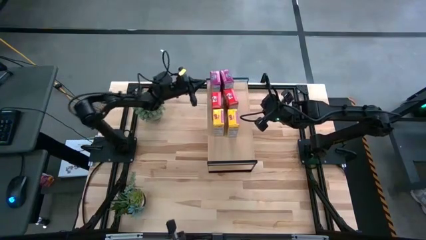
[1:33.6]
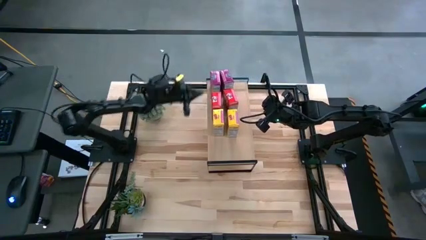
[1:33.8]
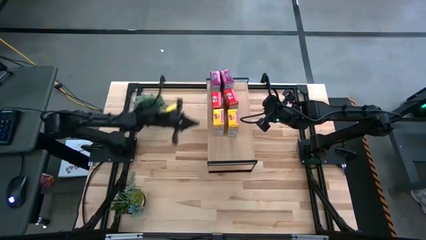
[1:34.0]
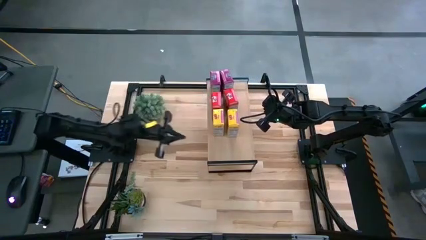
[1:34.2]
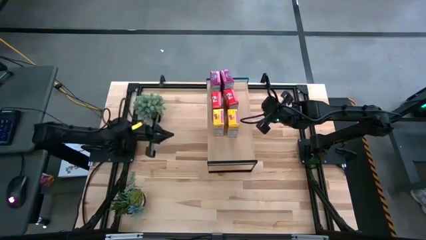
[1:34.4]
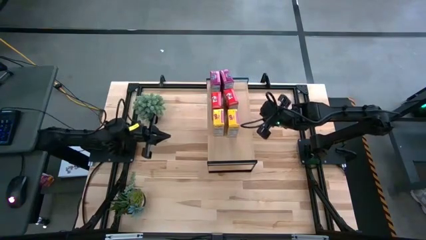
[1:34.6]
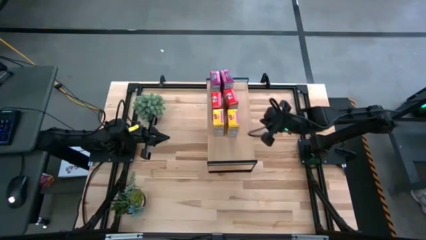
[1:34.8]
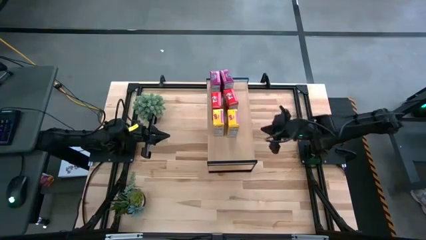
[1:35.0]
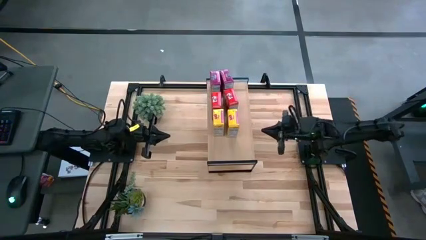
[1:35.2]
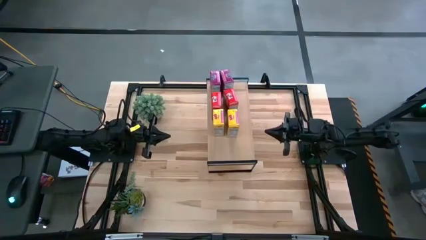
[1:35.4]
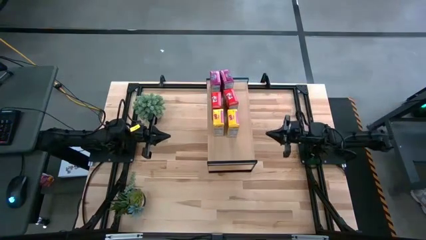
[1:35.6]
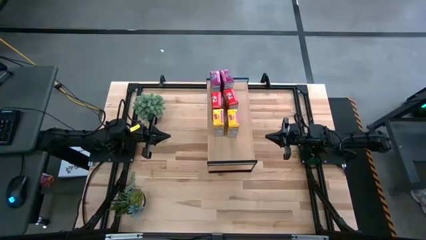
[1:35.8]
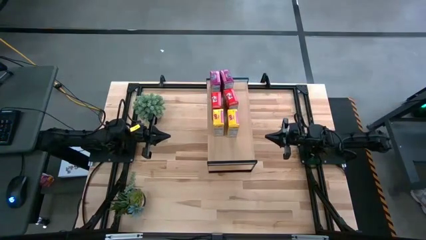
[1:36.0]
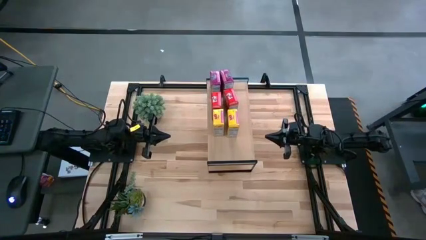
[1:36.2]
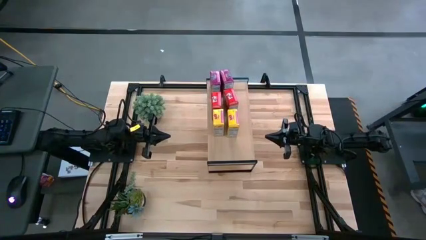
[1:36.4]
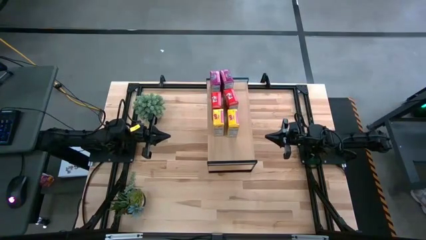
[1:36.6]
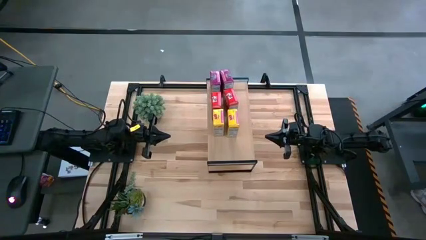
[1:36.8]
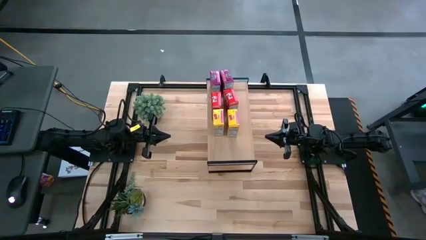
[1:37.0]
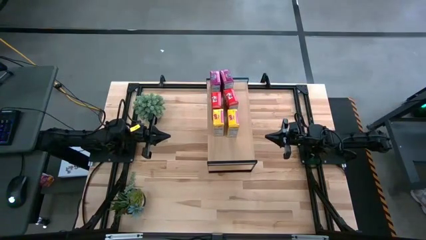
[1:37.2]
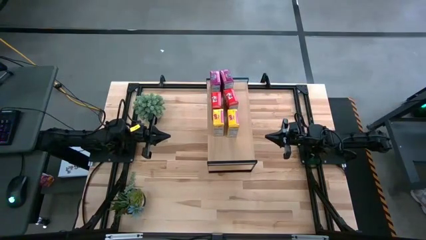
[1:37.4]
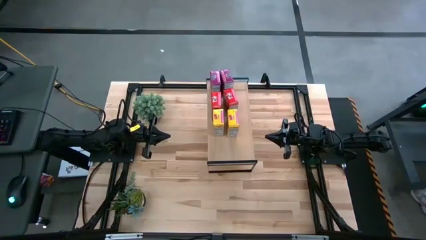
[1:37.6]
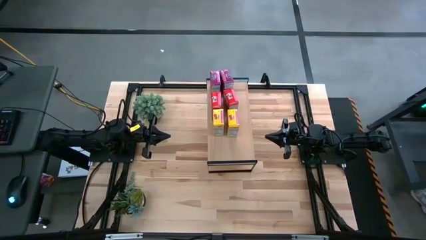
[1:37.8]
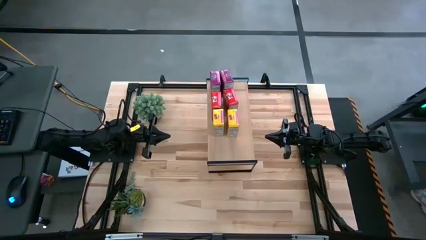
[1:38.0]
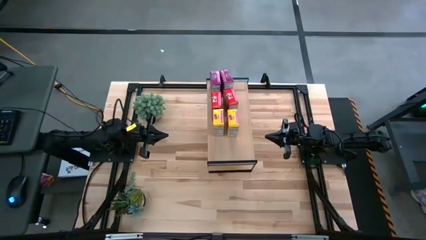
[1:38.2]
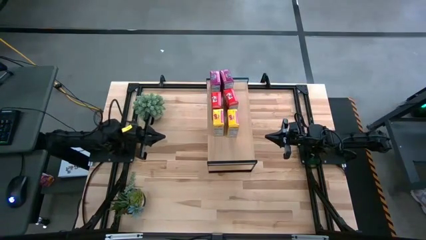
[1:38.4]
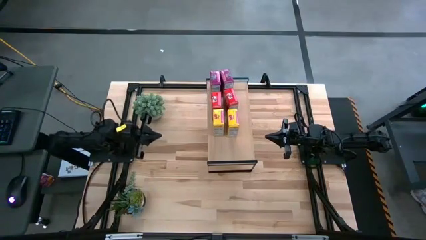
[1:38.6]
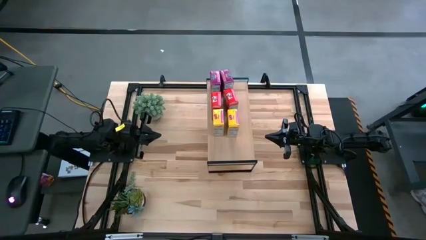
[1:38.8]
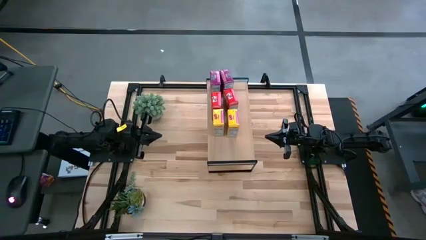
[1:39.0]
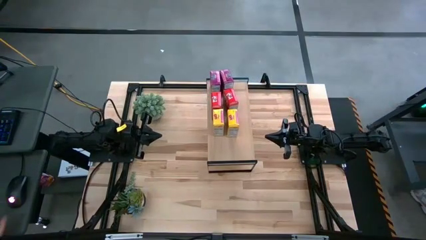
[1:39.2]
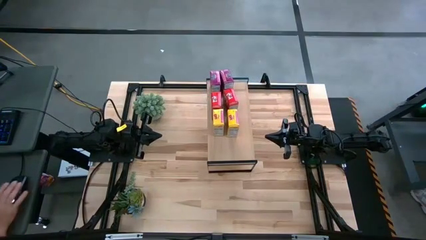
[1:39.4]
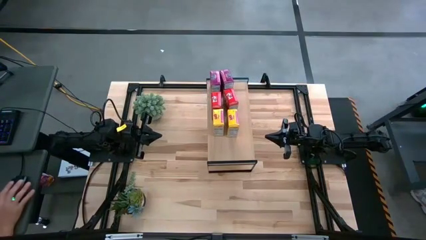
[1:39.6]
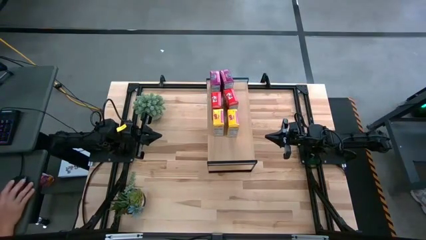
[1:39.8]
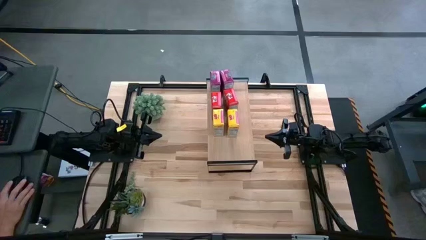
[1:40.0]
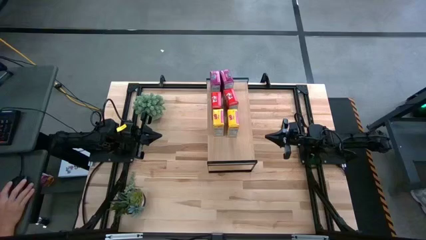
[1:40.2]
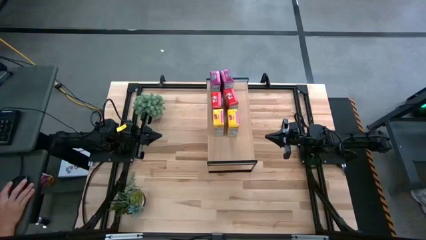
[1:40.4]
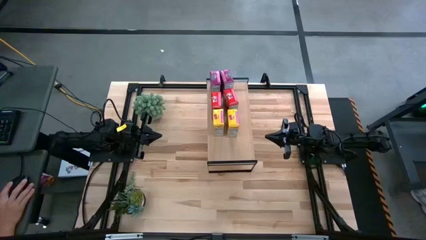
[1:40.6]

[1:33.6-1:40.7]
Task: Stack cereal on shelf
Return to Home Position

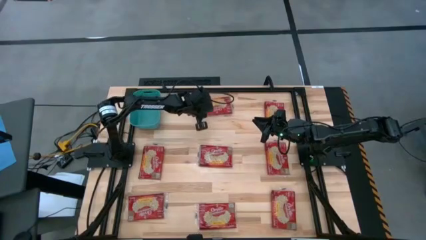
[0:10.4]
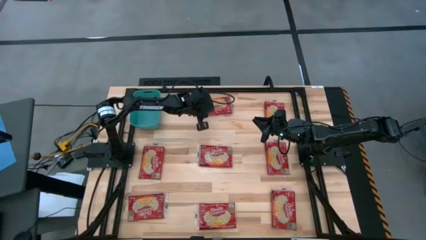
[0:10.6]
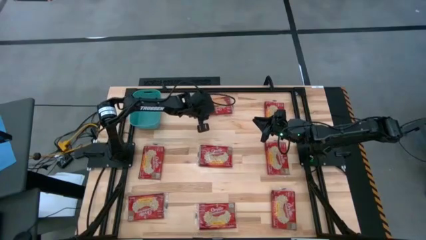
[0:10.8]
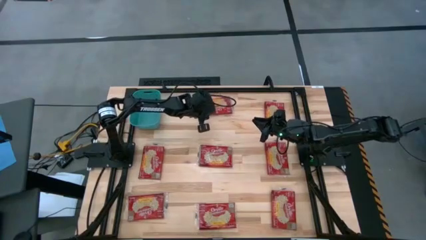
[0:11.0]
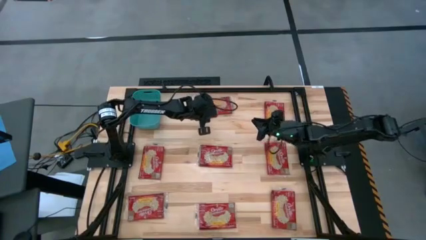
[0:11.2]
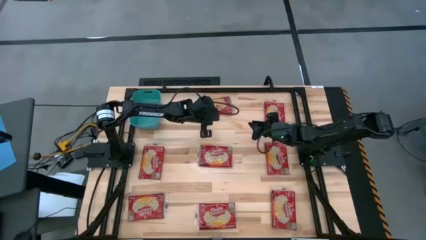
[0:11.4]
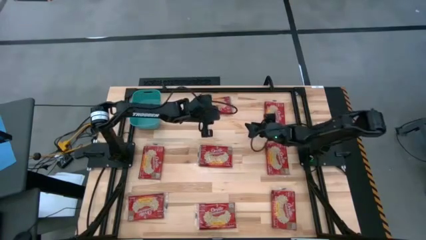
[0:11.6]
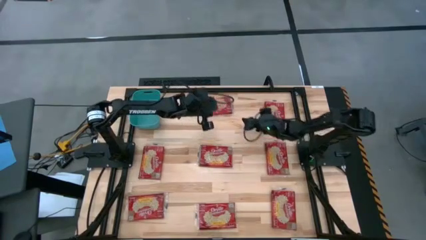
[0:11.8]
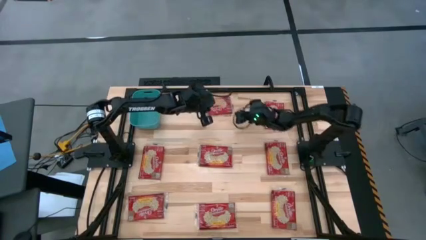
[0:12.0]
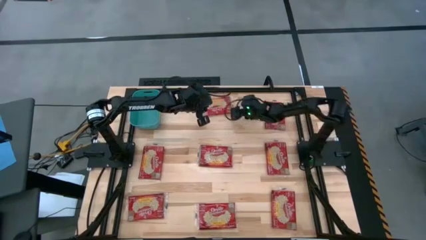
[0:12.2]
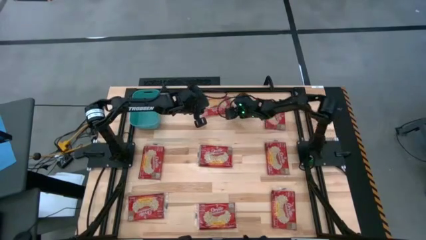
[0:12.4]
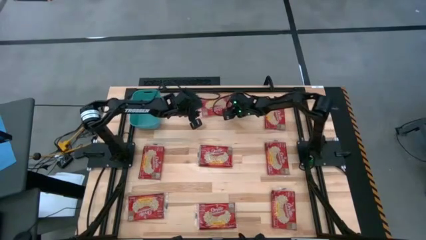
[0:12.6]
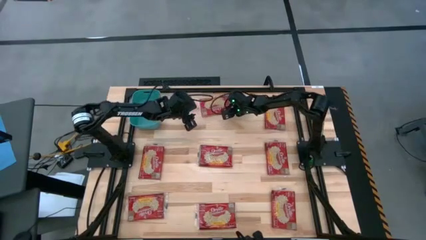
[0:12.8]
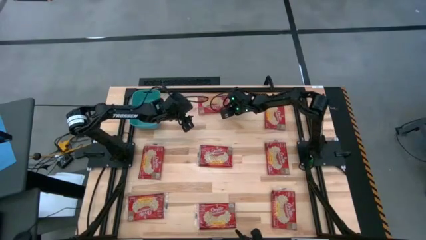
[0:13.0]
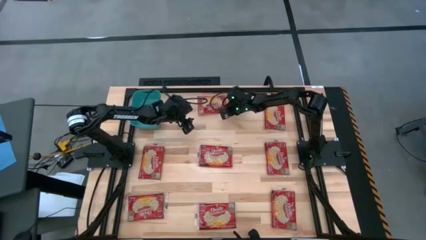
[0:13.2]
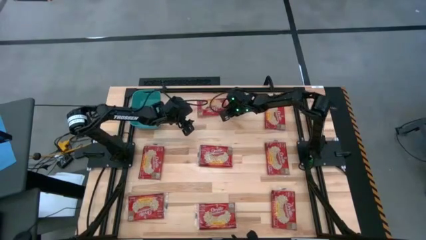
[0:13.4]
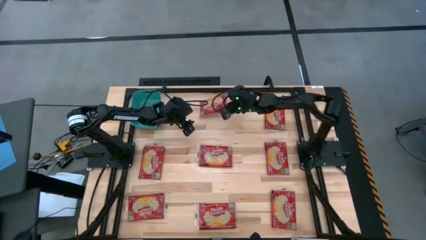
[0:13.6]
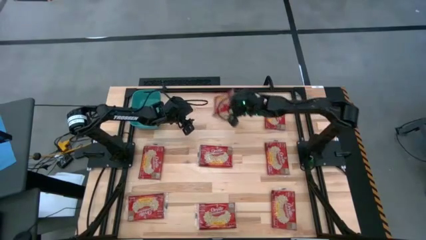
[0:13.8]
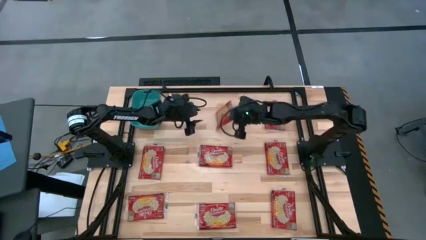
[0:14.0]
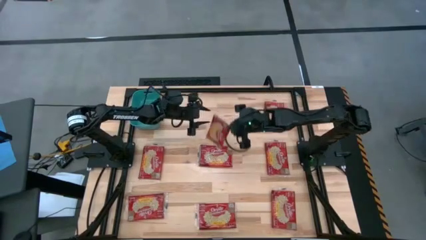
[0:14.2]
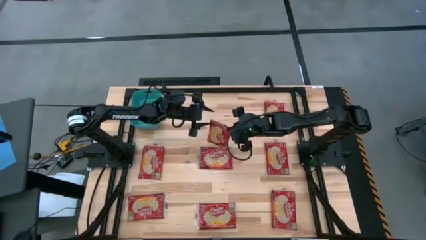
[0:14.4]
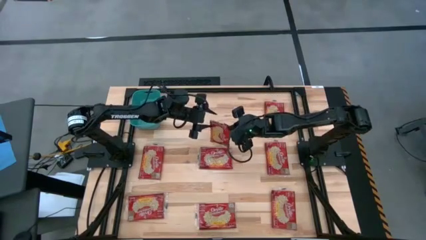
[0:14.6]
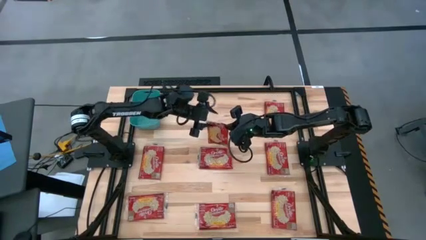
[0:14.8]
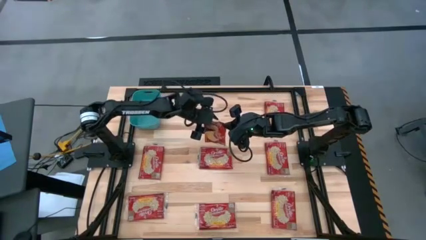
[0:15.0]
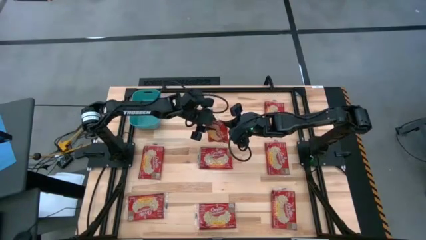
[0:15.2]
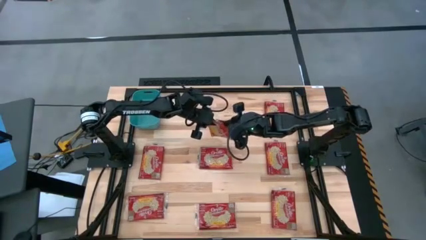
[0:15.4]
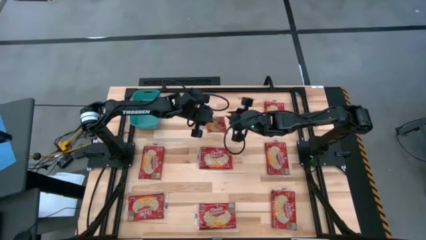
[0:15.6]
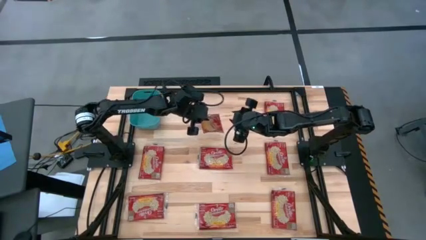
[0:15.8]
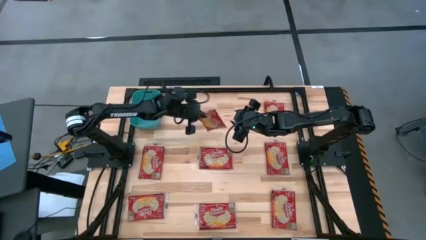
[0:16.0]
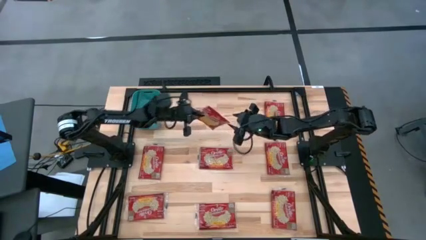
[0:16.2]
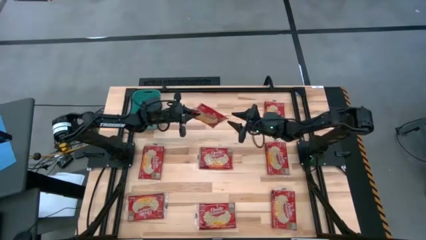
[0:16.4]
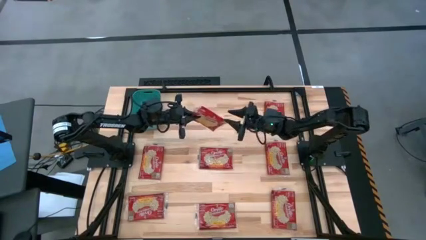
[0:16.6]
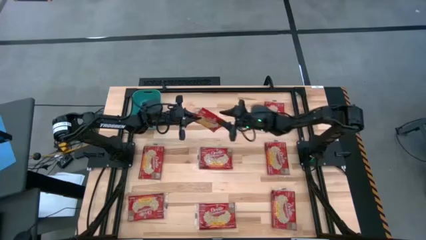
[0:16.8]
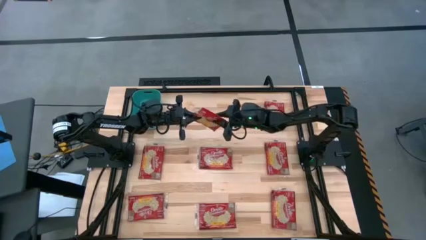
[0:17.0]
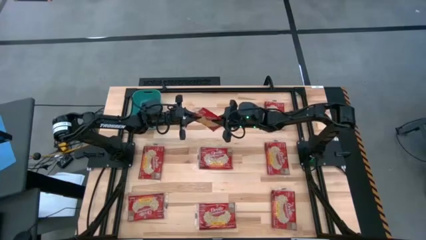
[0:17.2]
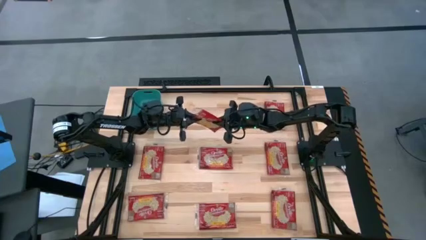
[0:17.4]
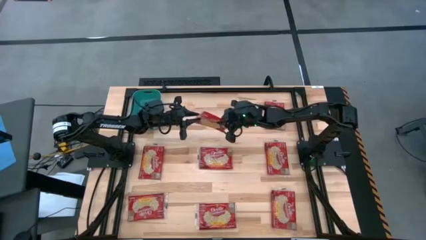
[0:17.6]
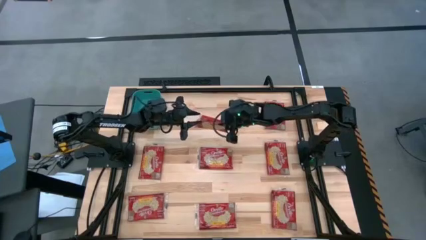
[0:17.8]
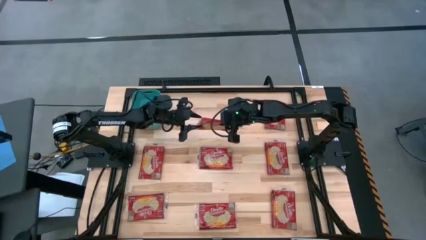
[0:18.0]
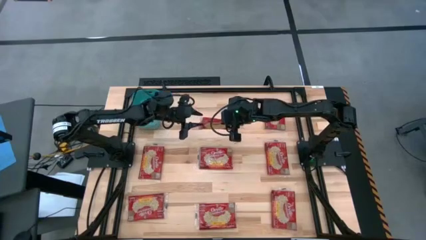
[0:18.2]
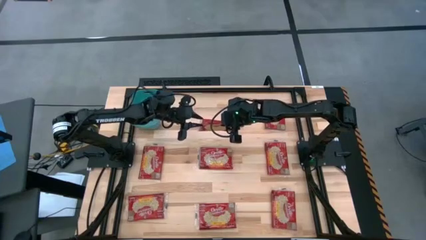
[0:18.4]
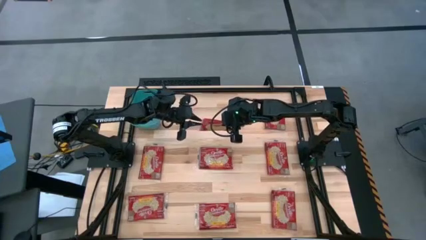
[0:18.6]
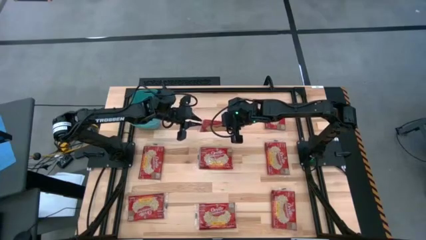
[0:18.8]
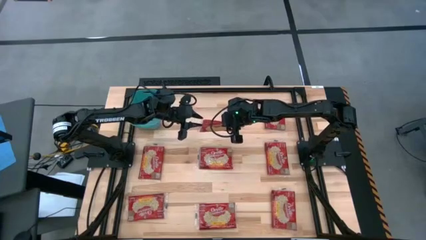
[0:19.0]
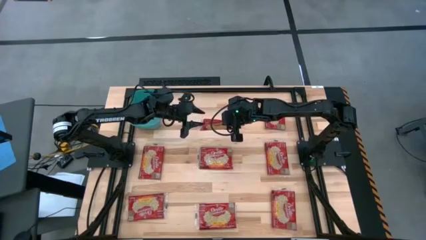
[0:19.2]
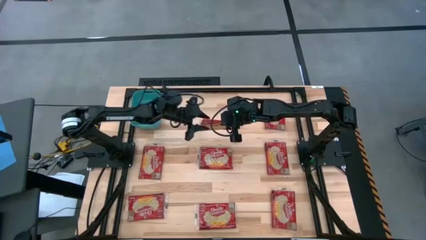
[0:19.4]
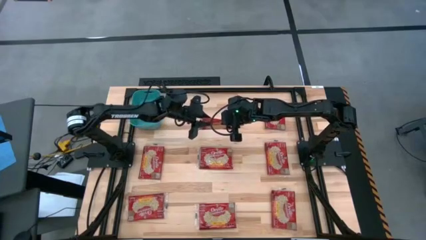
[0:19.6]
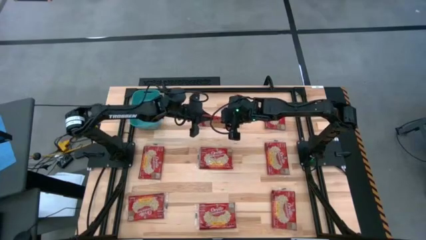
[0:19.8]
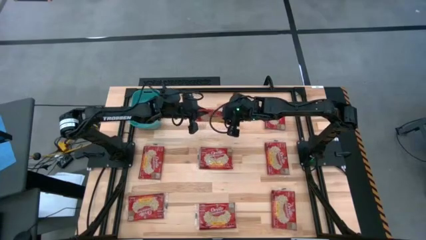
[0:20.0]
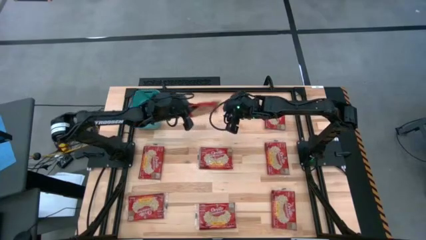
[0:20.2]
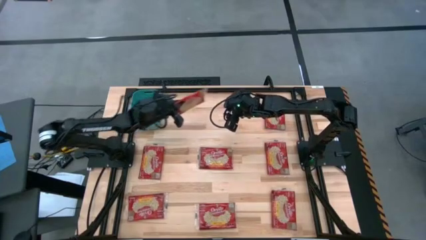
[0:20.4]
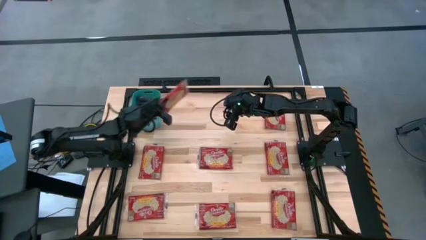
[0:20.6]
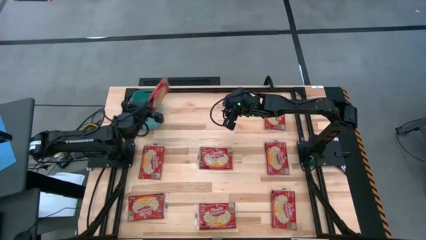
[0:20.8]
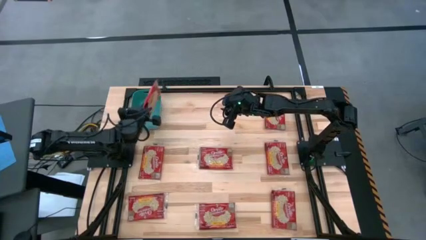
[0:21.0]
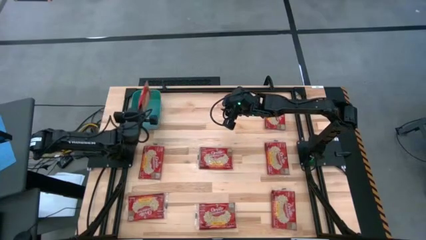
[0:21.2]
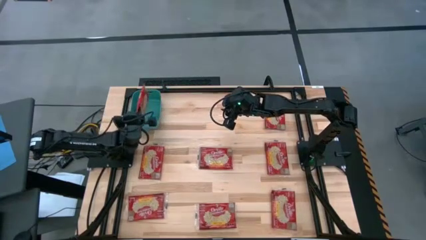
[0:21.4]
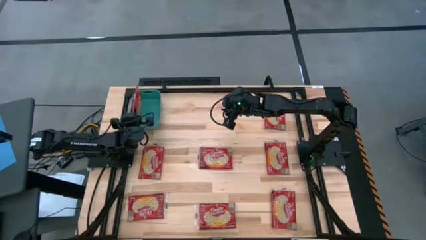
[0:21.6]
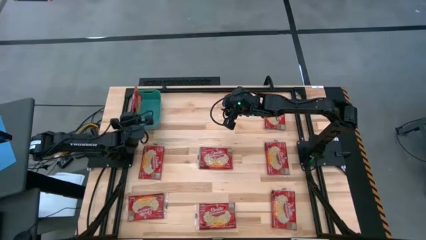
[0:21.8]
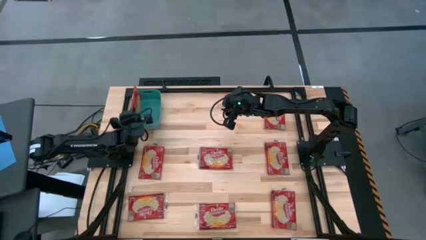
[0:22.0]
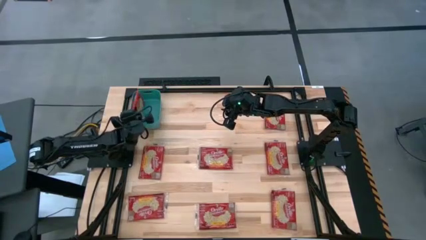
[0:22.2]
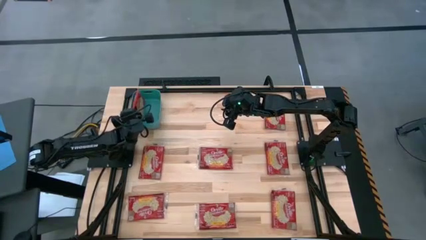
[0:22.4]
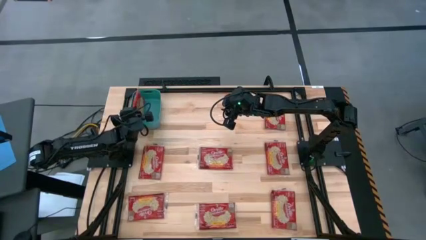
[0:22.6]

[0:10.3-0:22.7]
Task: Sort popcorn bags into baskets
Put the red popcorn bag in the blue bin
